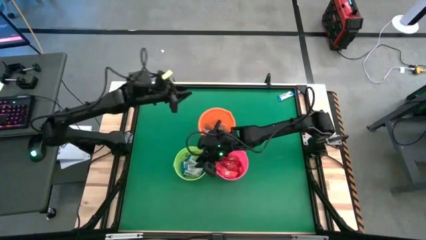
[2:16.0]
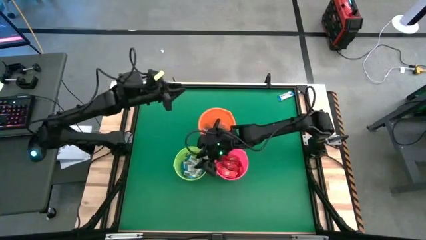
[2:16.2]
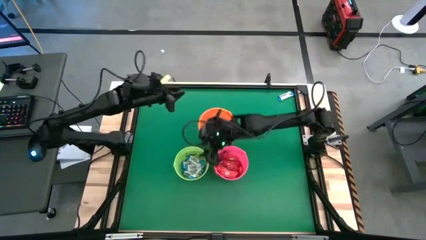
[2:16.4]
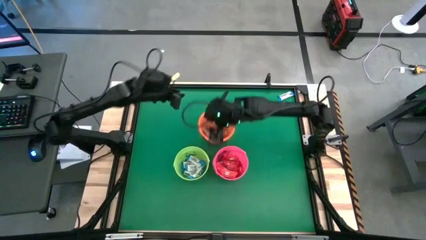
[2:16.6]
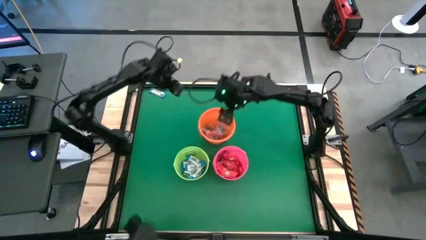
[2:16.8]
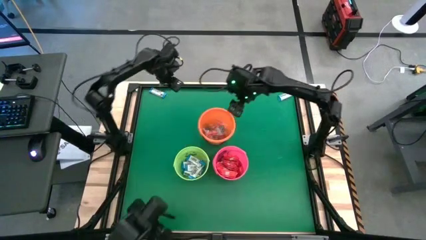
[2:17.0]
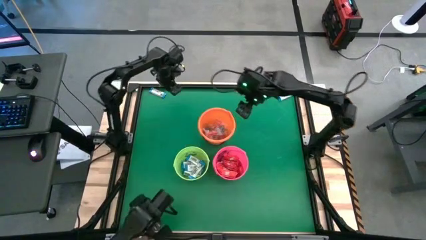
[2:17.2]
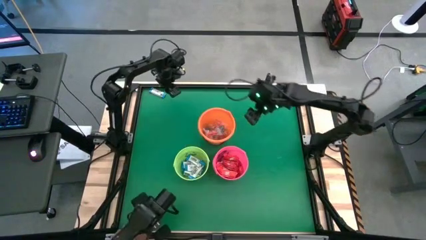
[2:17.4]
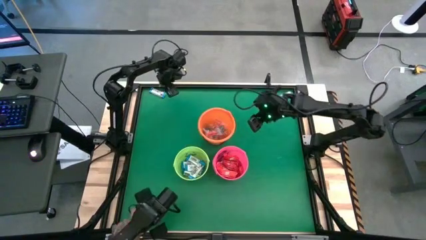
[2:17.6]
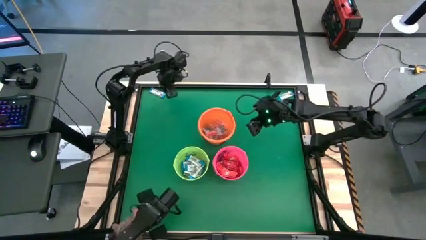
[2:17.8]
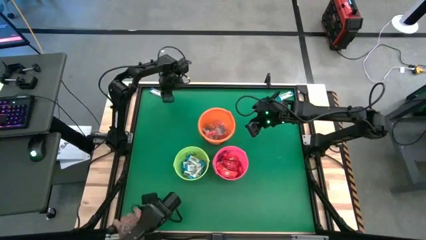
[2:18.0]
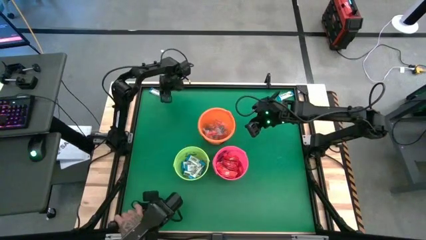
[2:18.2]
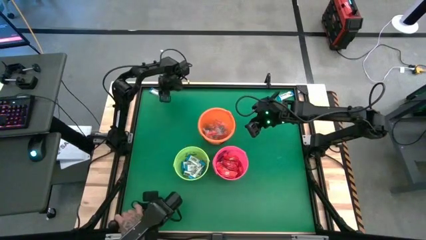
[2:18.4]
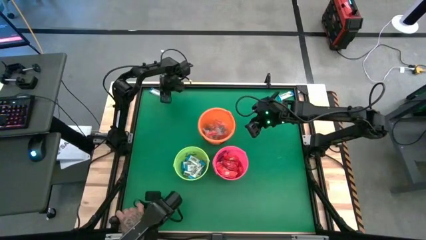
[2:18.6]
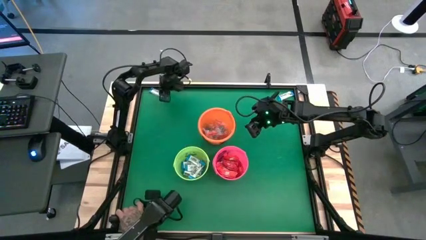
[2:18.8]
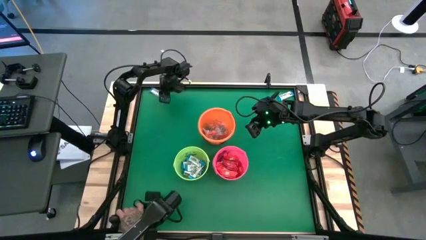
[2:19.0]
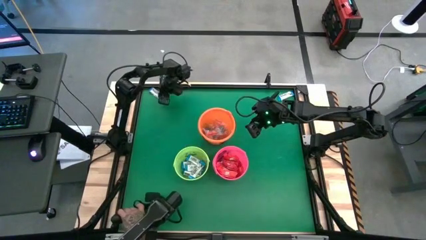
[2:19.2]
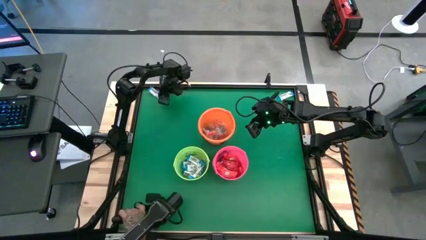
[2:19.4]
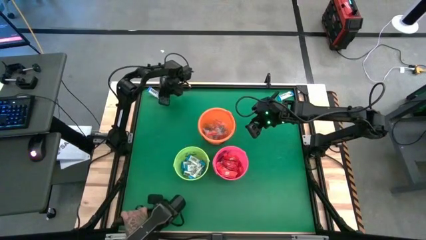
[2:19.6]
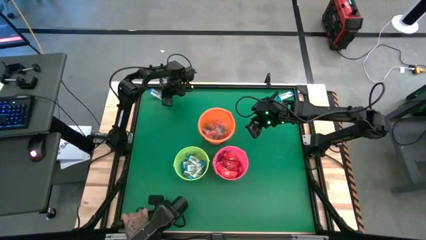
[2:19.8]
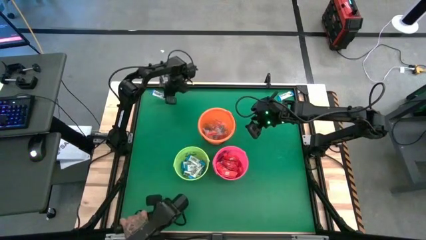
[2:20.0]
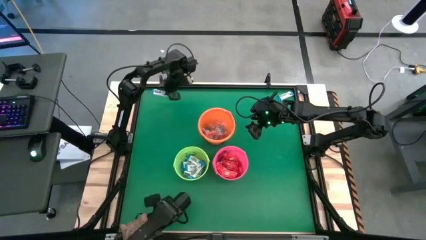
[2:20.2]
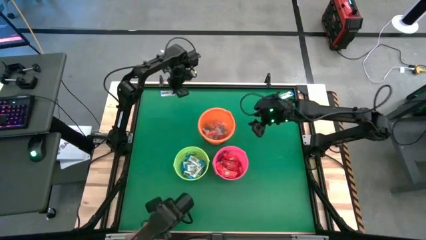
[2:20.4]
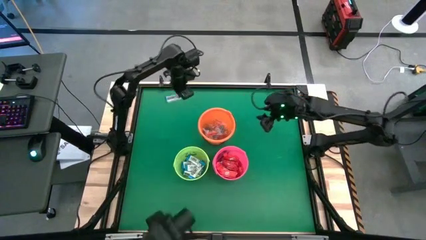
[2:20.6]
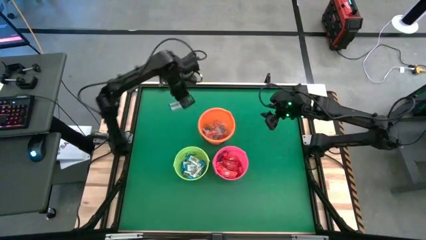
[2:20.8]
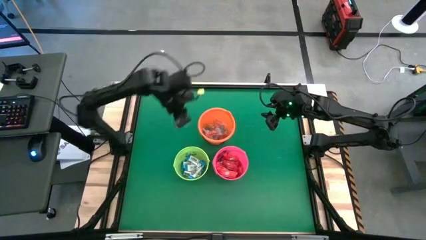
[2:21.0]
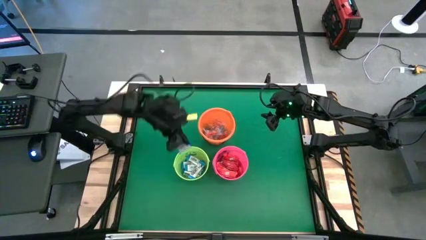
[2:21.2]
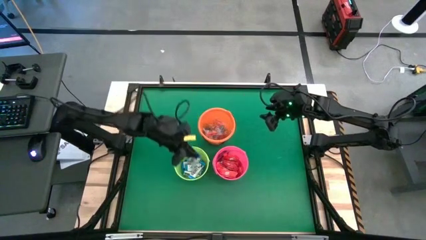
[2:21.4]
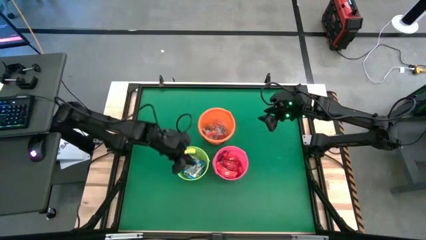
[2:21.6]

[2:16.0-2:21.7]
Task: Sort candy by brand, put in halloween buckets
Put the white chocolate bar into the green bucket

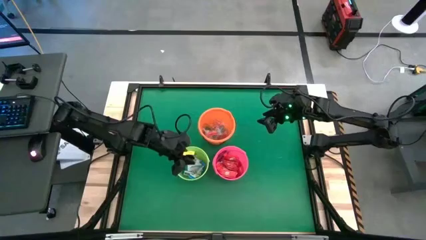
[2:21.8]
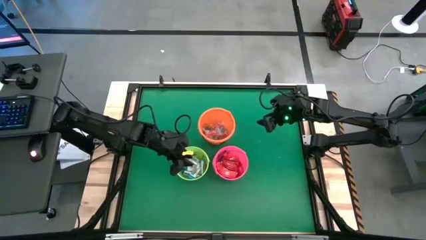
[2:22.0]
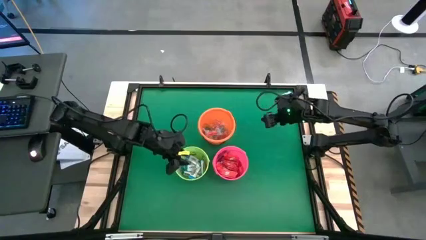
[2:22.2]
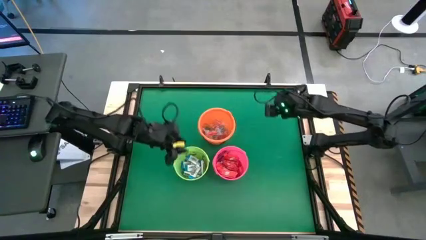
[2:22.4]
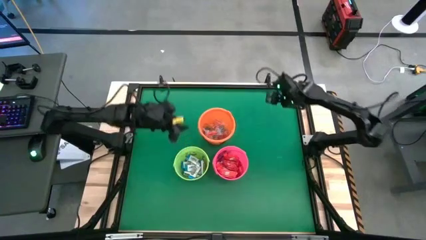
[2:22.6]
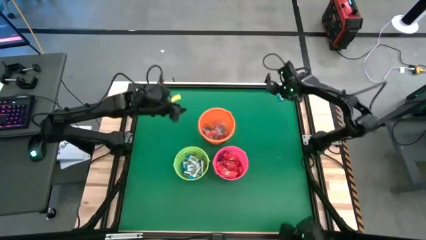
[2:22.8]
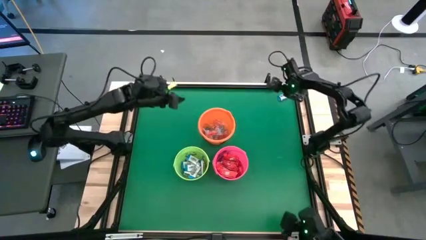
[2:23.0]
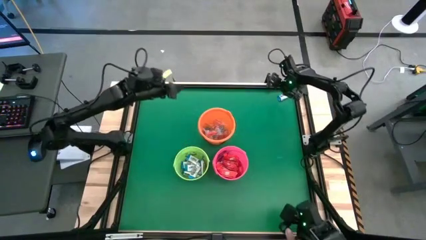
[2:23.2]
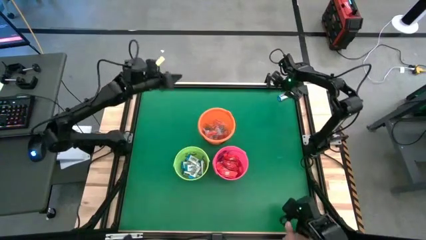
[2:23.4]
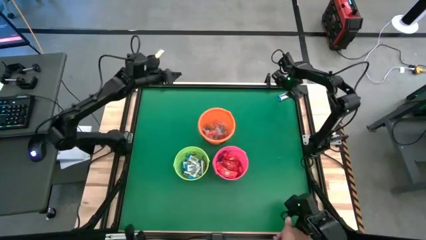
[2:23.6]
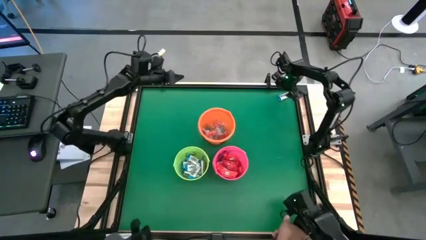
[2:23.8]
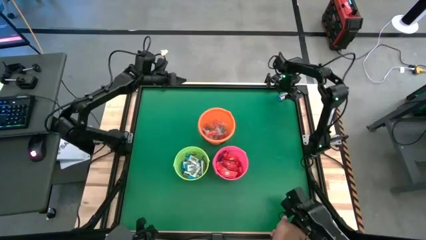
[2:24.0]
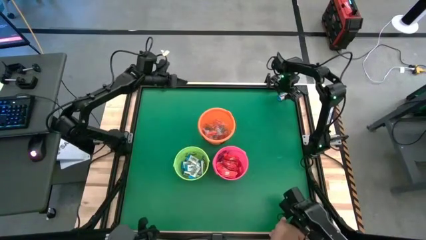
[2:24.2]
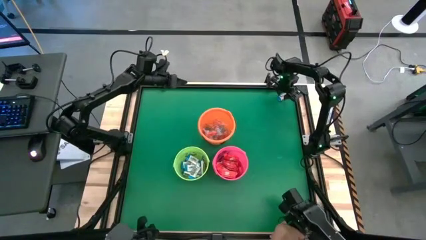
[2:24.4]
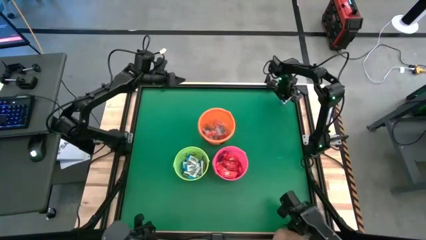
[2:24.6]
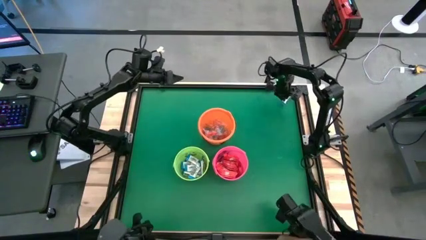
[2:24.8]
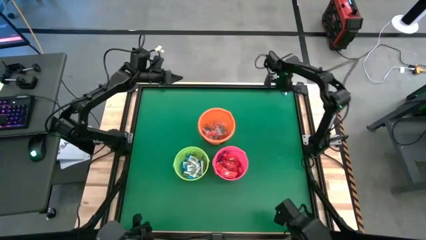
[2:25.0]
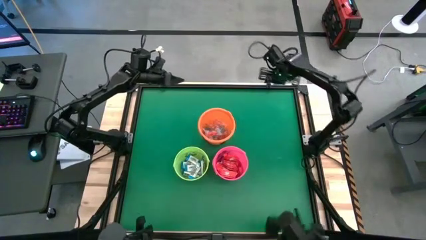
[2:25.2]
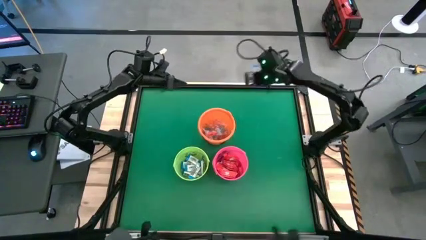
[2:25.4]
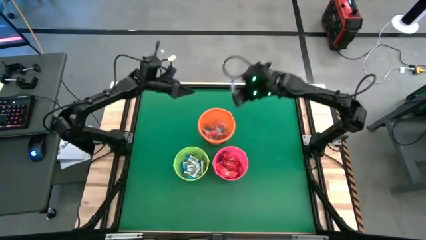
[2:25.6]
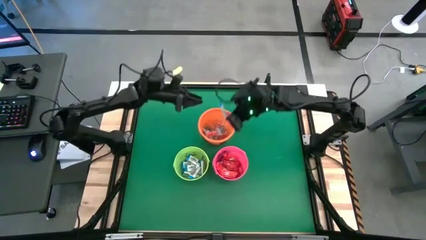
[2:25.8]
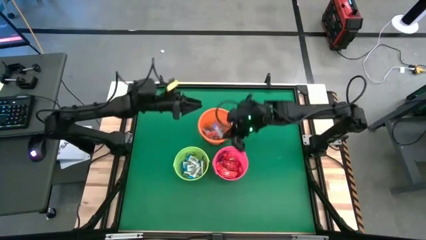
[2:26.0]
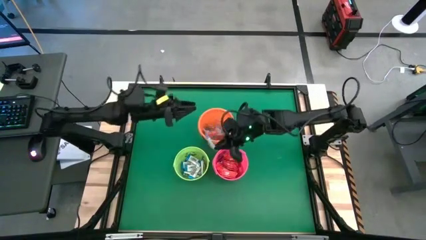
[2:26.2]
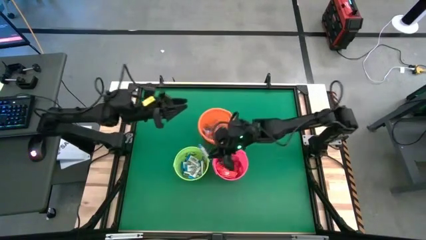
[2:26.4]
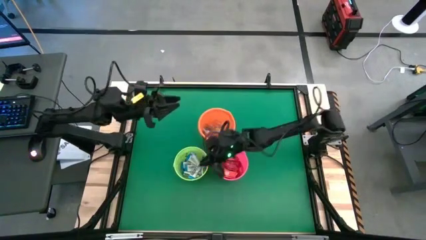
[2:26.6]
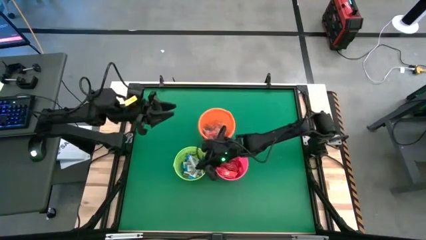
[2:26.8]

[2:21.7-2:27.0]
Put the white chocolate bar into the green bucket

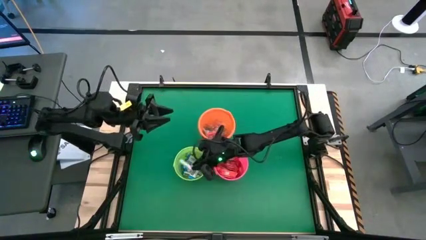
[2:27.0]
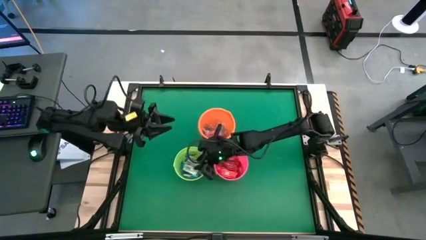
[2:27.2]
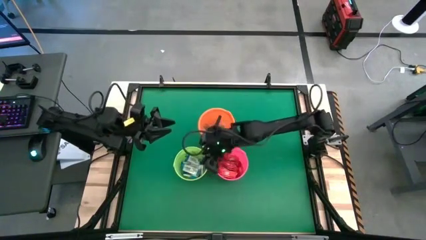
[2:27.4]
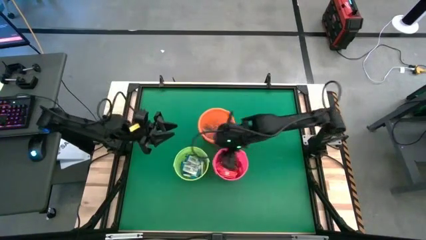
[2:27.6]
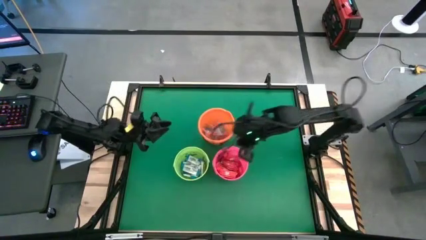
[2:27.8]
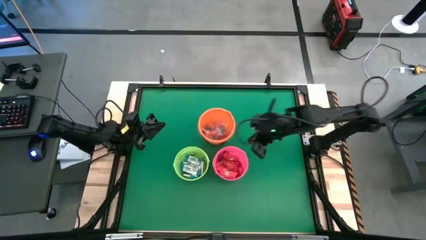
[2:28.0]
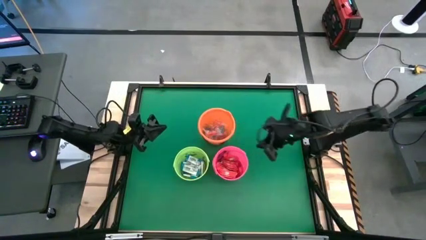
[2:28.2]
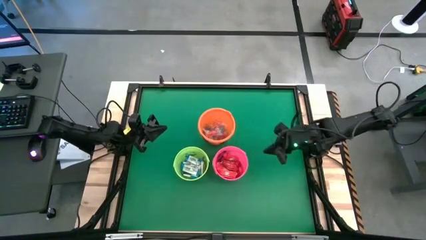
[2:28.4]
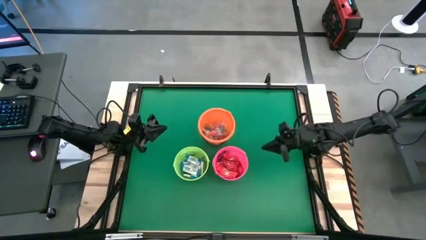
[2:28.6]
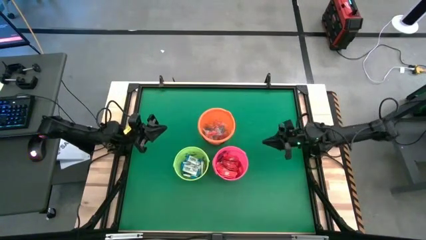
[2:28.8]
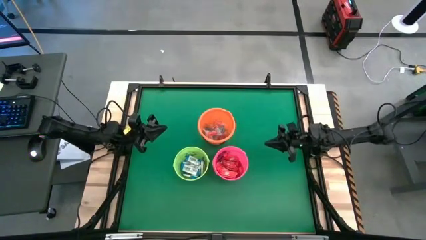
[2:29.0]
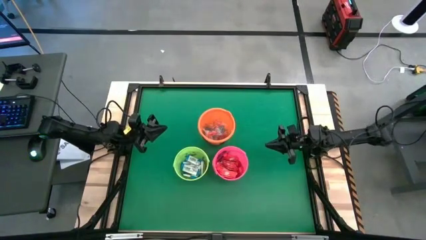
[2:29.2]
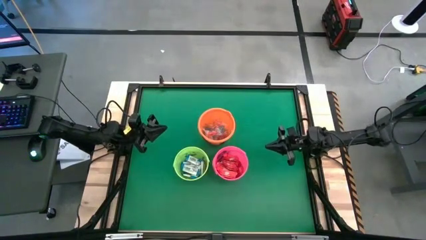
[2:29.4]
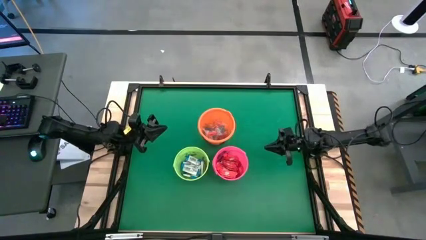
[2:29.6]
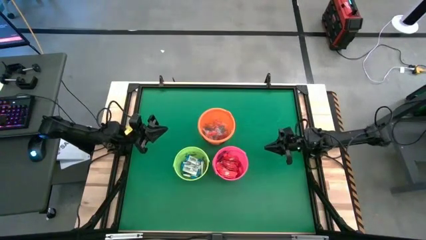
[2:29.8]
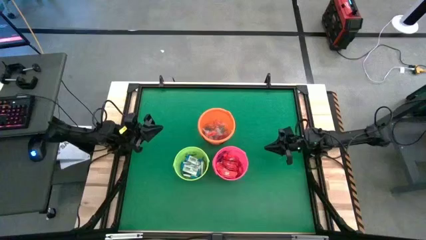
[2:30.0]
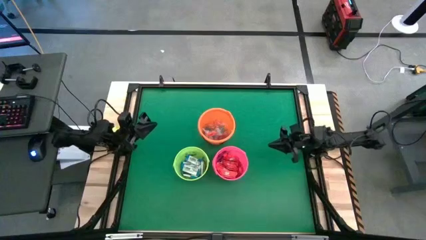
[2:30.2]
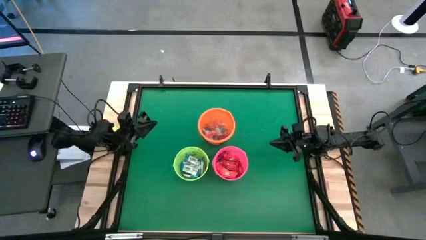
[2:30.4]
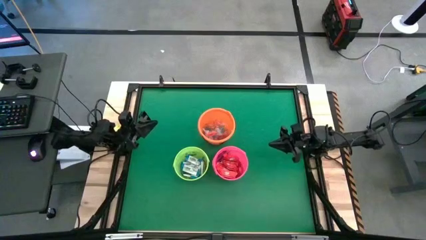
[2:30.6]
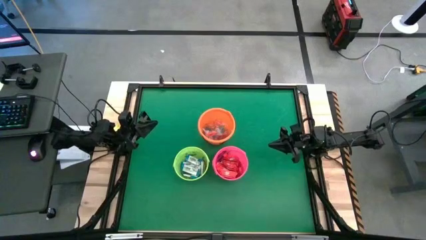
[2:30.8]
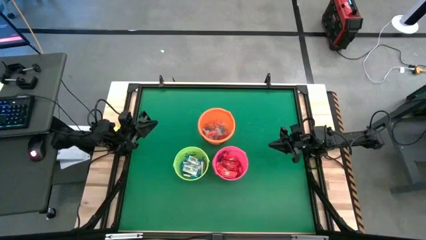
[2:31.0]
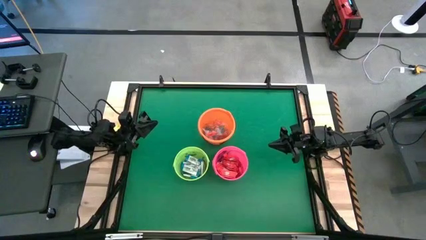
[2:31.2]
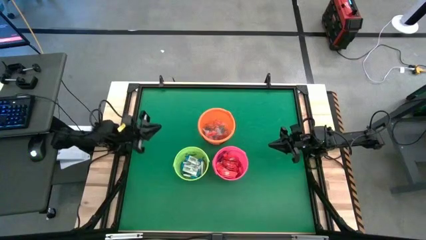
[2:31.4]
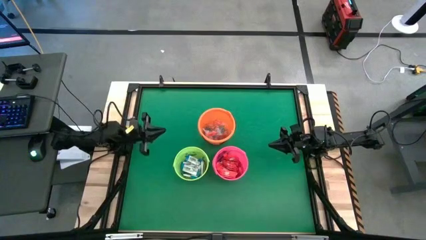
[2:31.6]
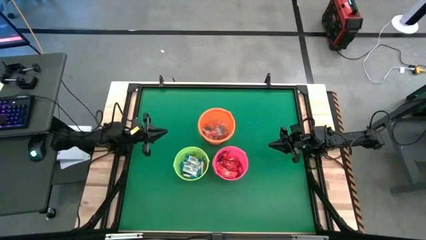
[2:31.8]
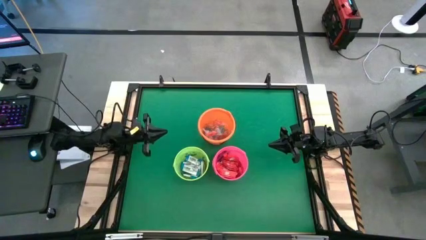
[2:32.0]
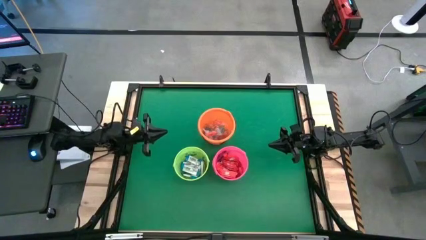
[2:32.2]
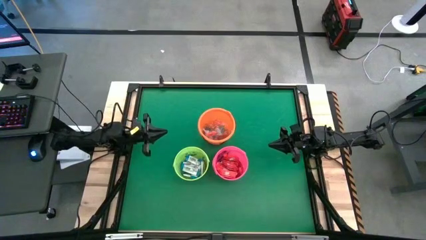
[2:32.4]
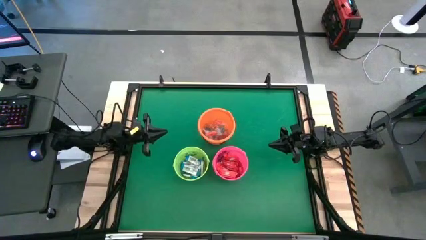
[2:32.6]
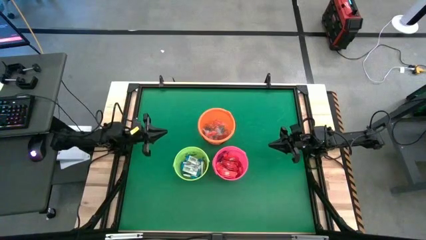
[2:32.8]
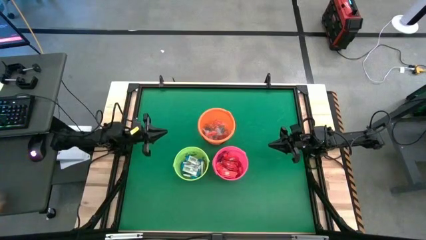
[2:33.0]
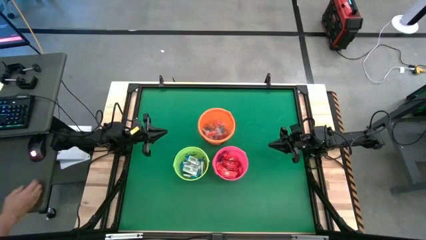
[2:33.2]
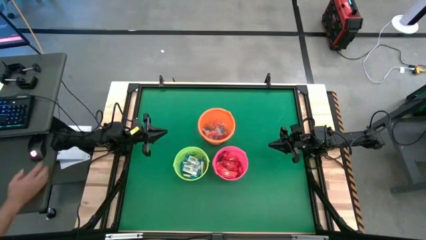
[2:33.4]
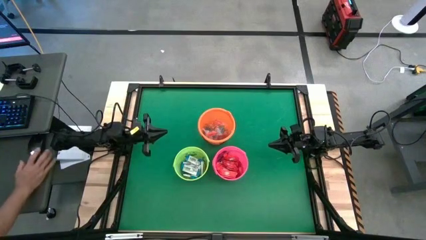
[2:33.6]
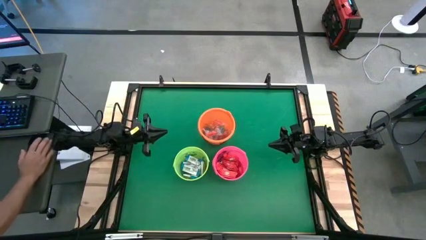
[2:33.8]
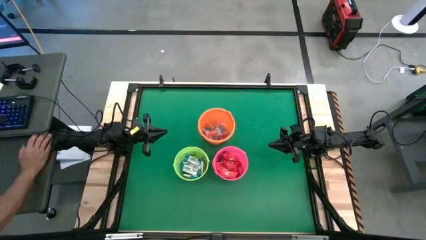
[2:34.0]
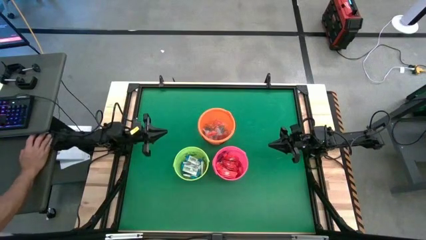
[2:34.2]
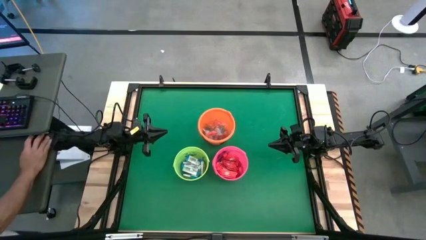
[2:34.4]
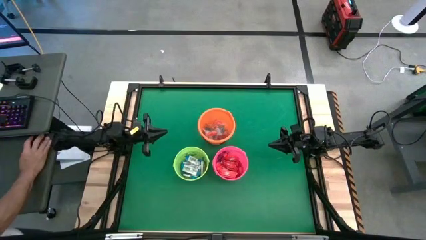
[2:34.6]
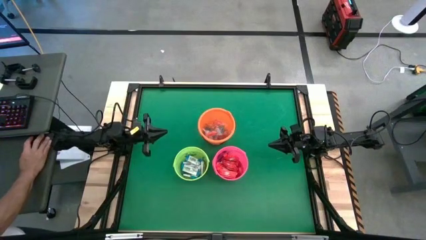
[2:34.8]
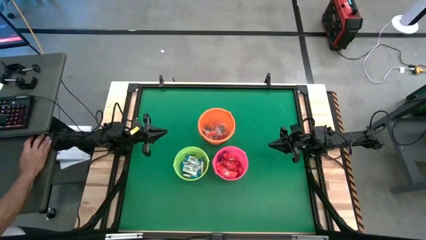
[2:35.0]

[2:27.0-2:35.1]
Return to Home Position
